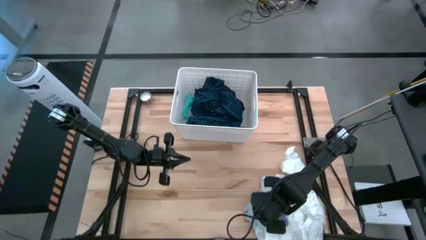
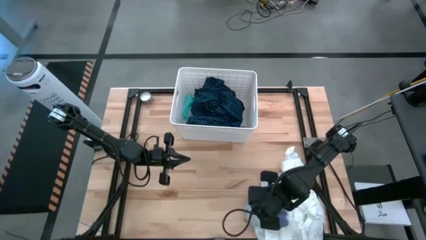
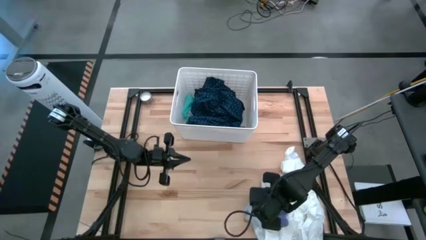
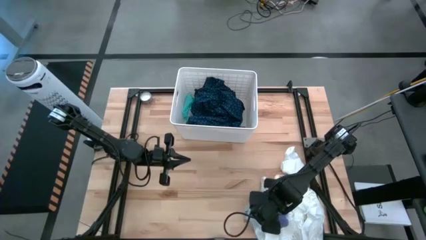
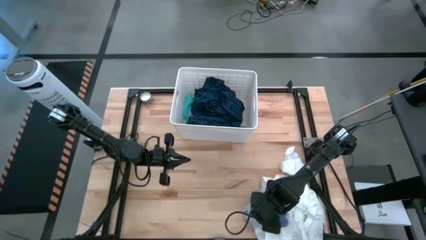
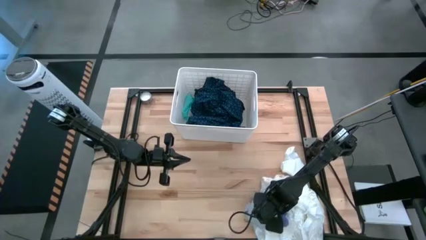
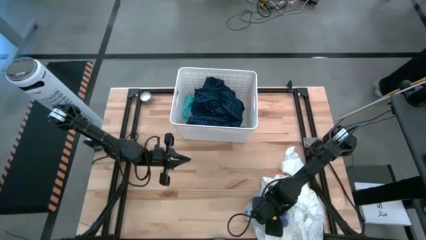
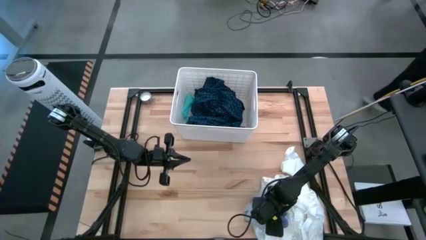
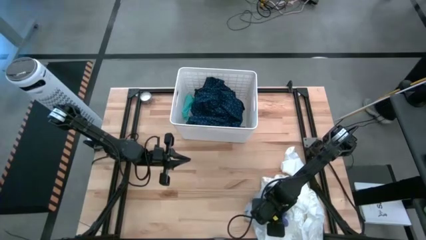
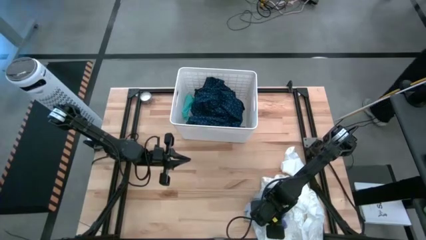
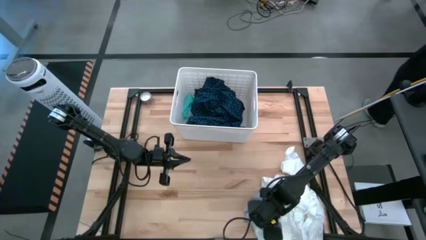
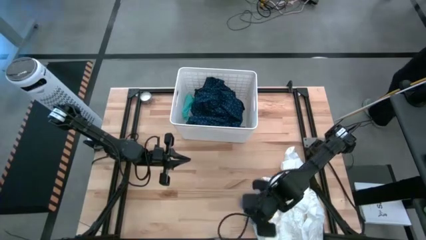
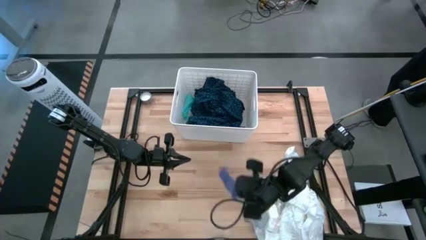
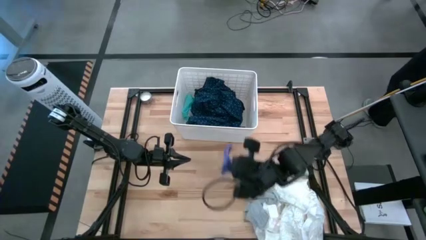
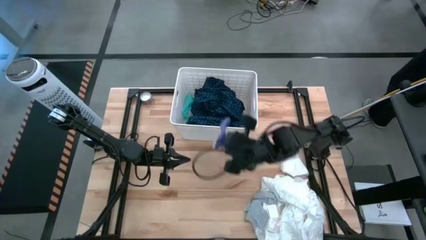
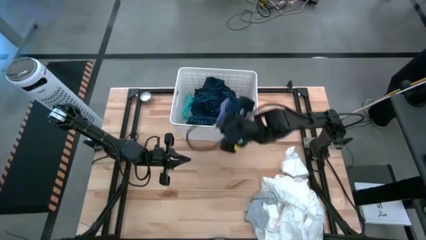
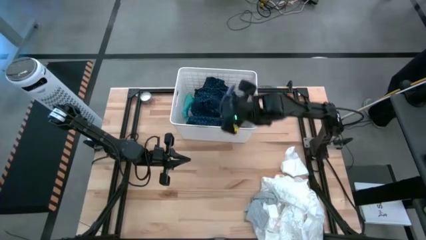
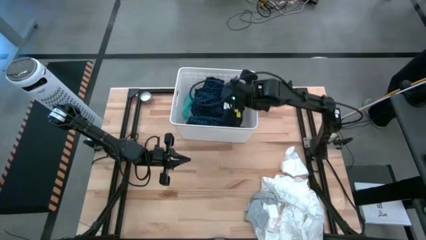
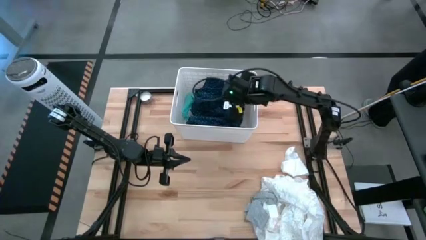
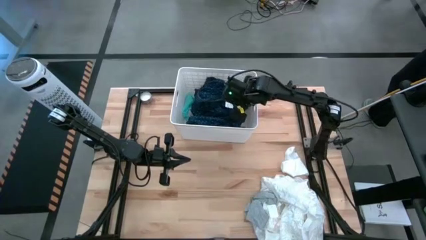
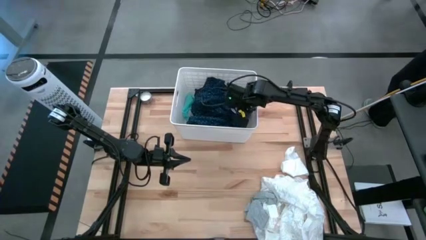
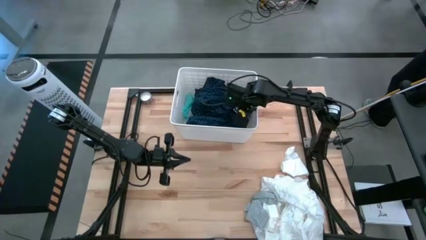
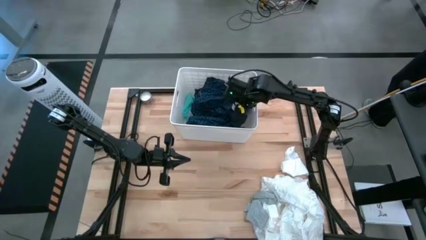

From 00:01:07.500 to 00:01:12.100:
Task: Sort clothes
Put the blue sock into the laundry organizer

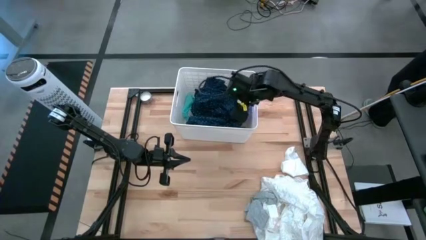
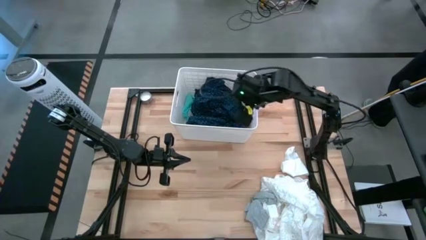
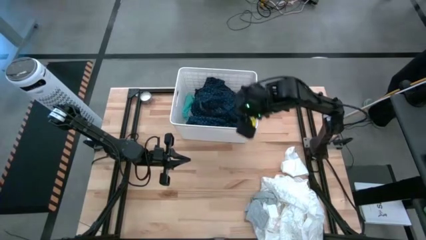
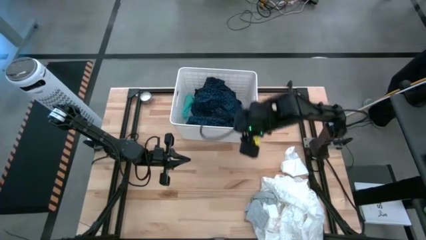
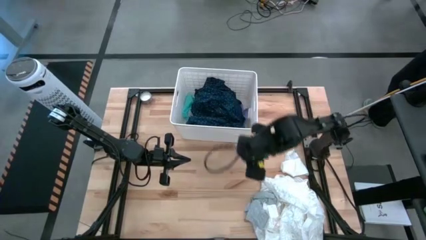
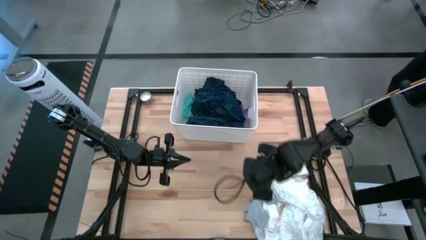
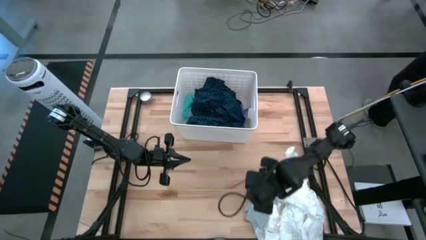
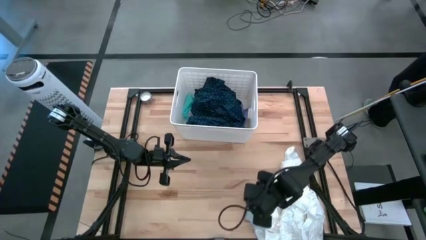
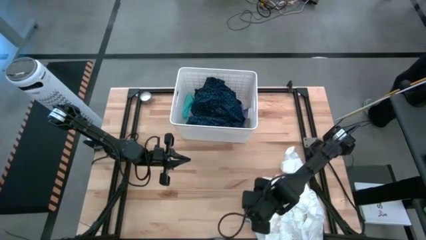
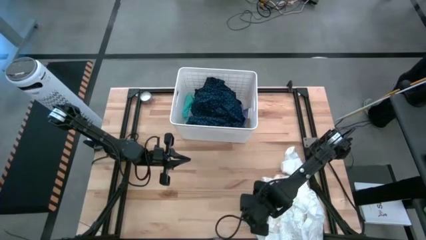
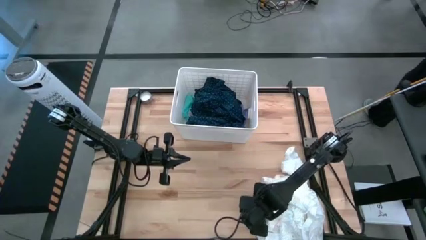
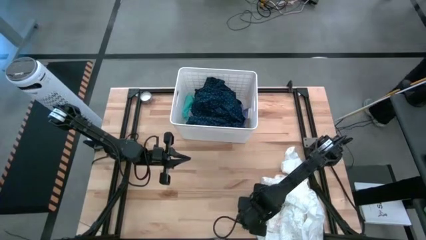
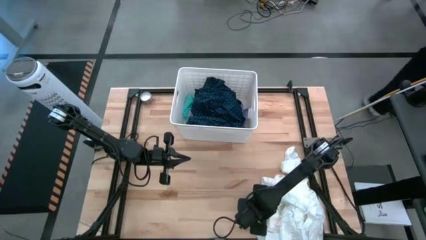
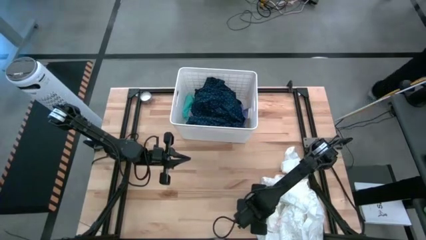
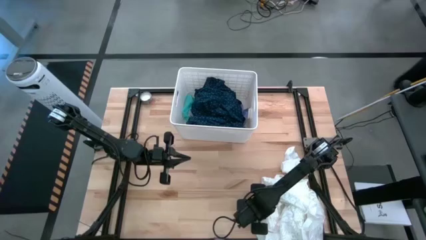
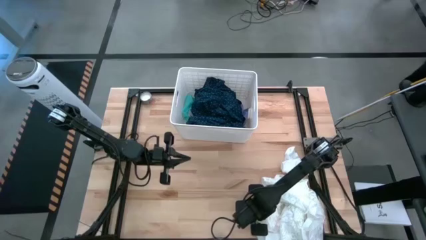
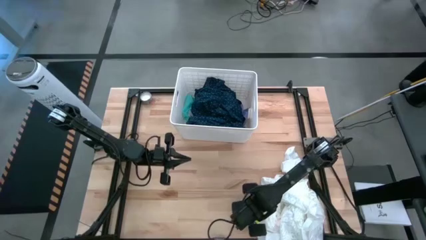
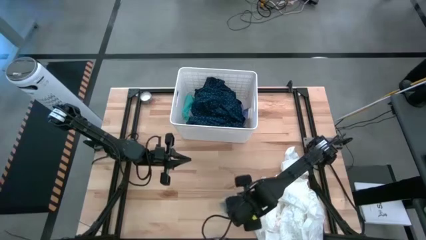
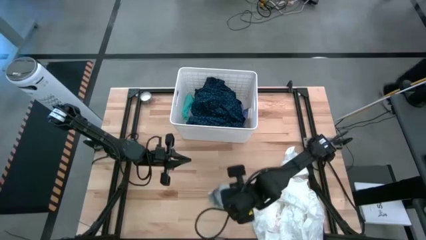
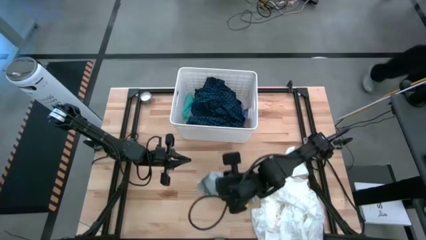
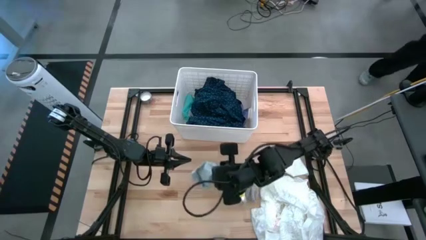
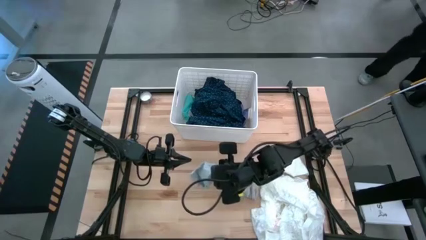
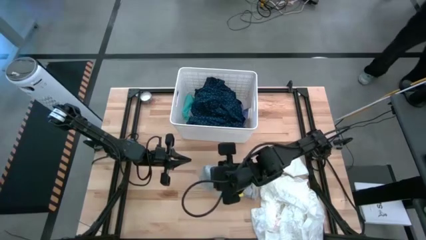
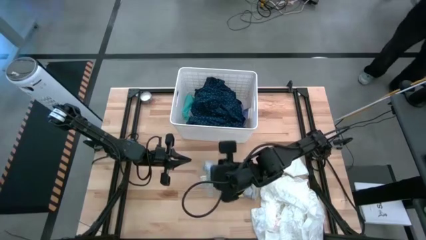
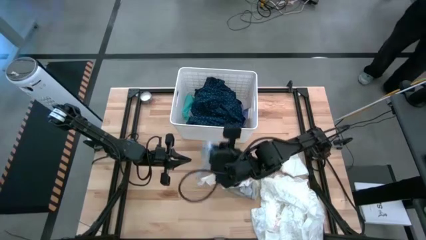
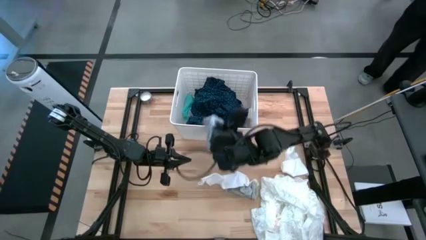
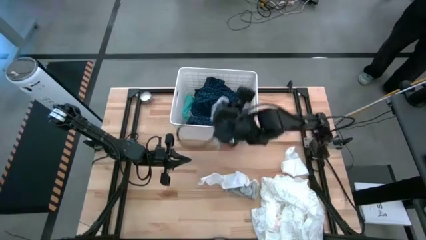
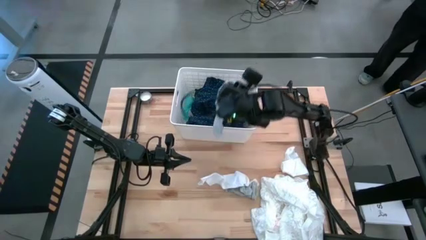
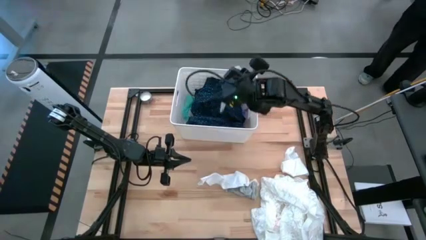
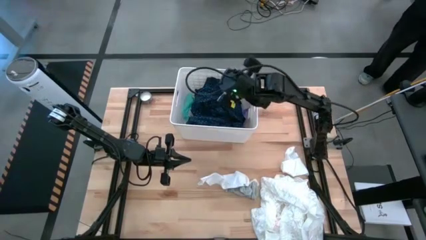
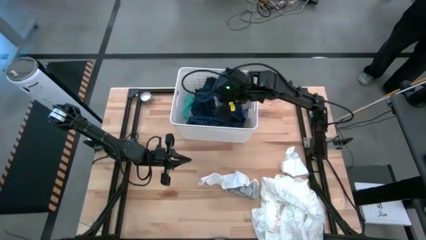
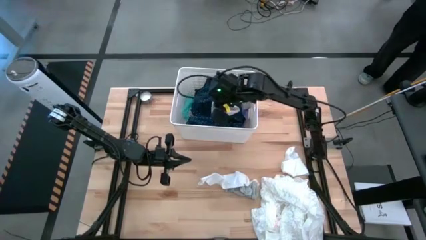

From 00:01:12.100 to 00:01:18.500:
Put the gray sock into the laundry organizer

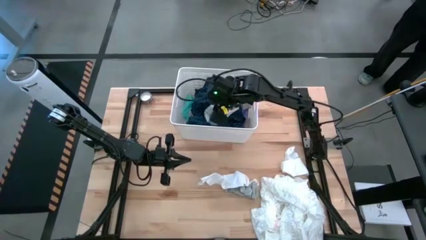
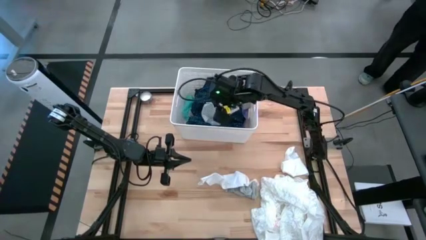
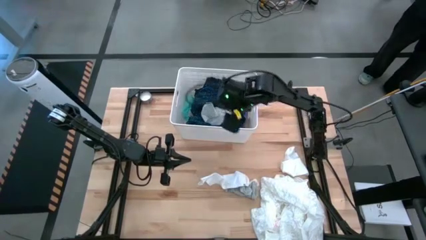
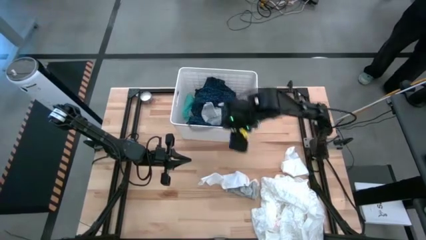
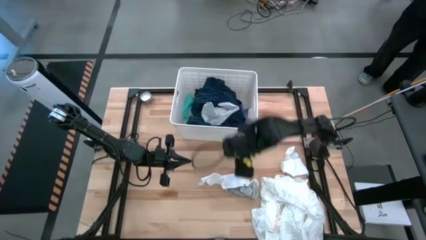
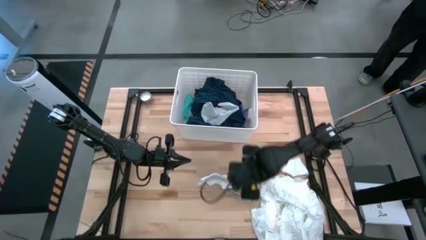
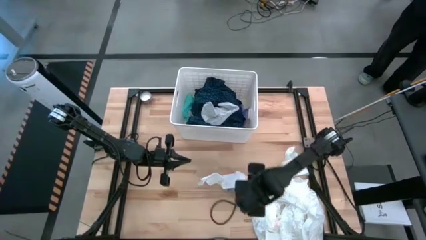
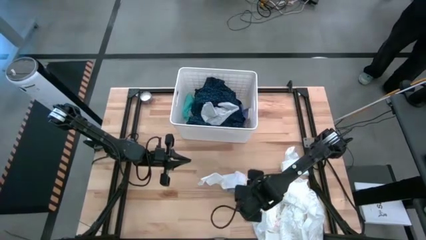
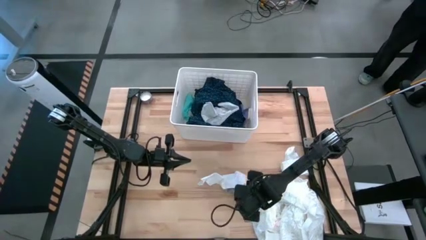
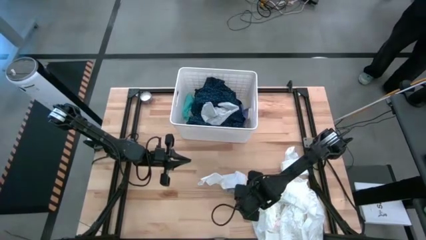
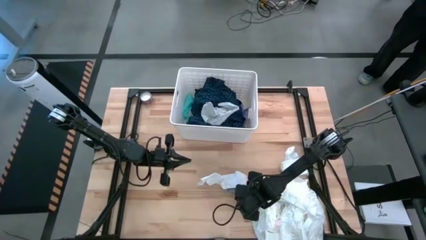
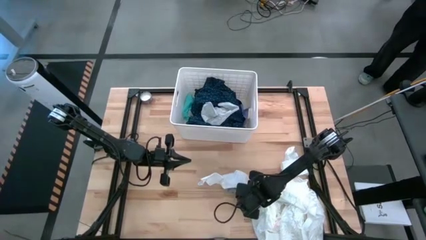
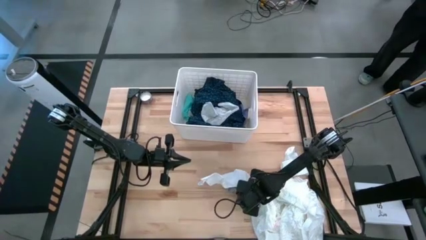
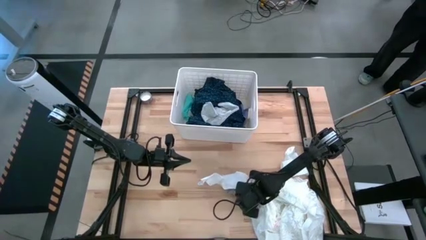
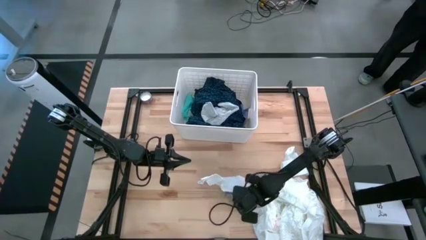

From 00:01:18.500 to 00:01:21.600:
Put the gray sock into the laundry organizer

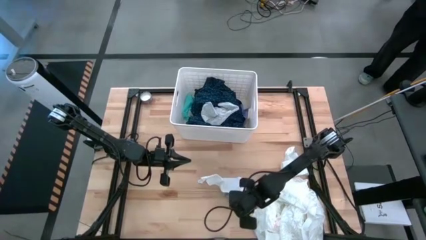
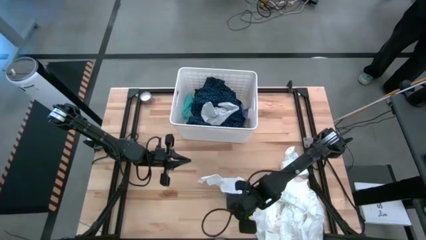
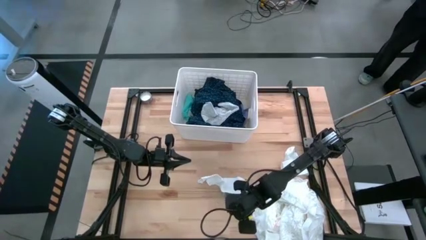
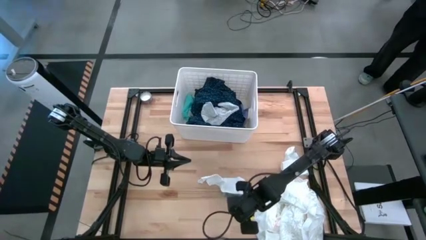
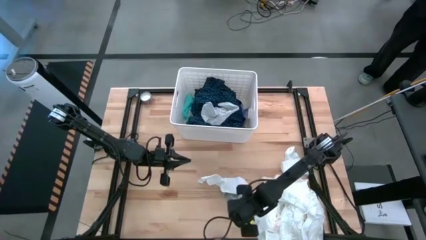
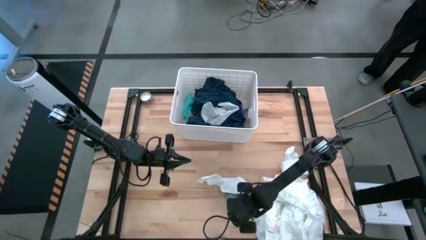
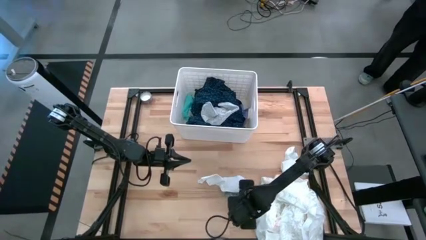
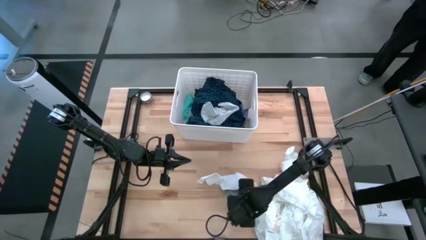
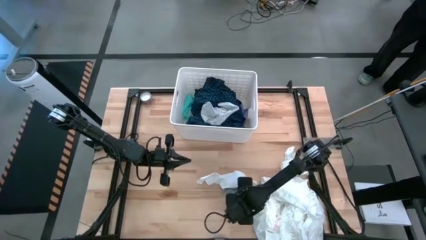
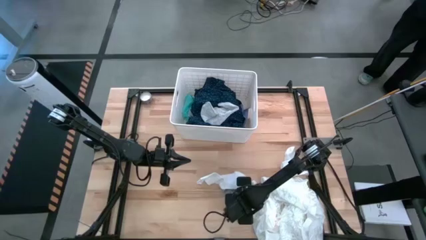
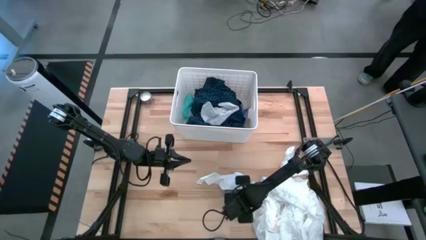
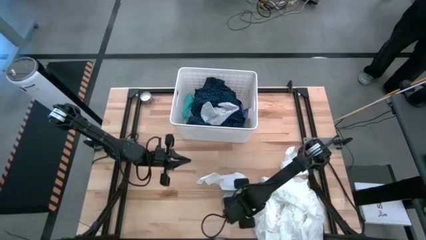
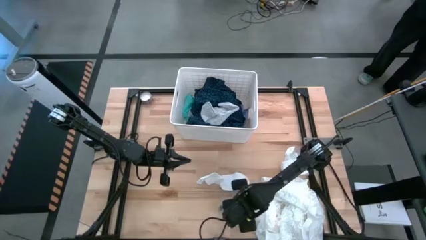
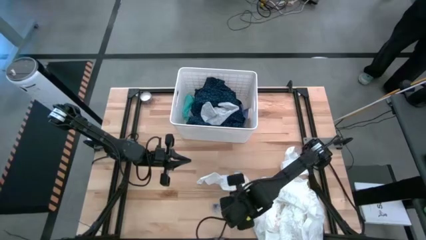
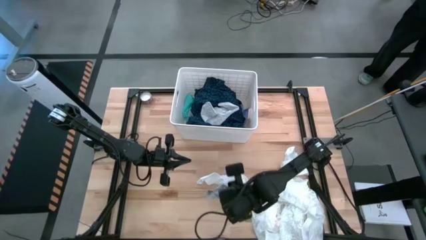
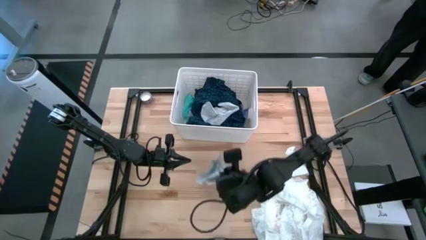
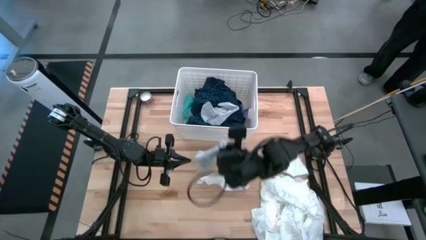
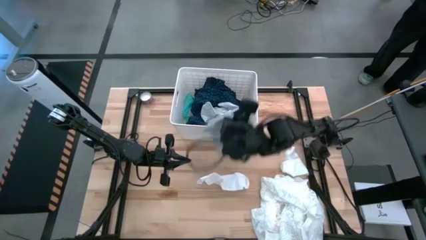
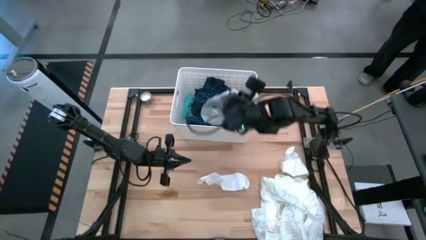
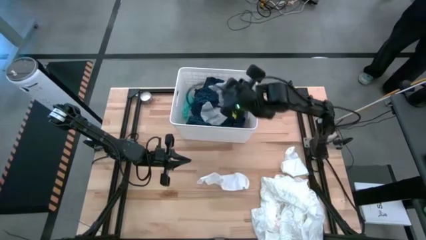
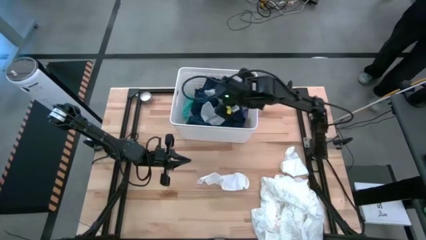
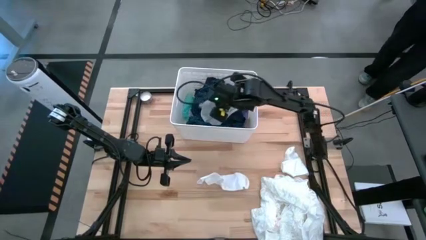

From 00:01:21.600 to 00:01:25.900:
Put the gray sock into the laundry organizer
